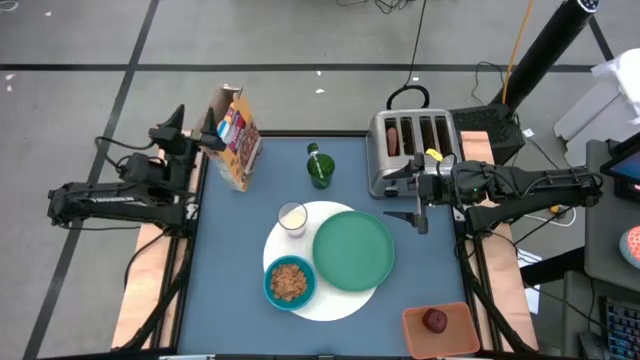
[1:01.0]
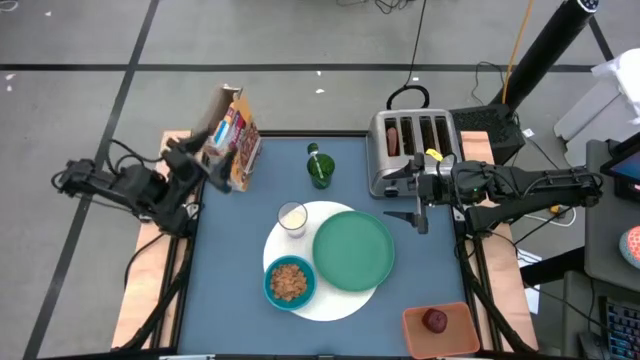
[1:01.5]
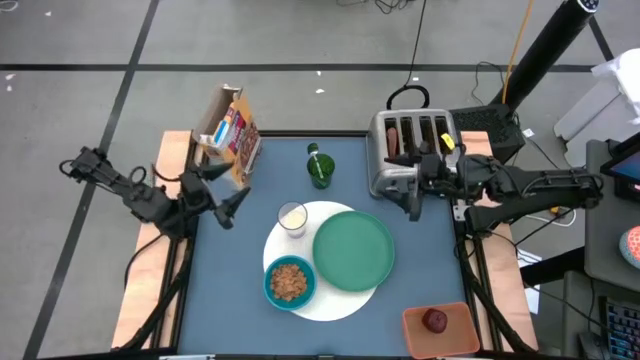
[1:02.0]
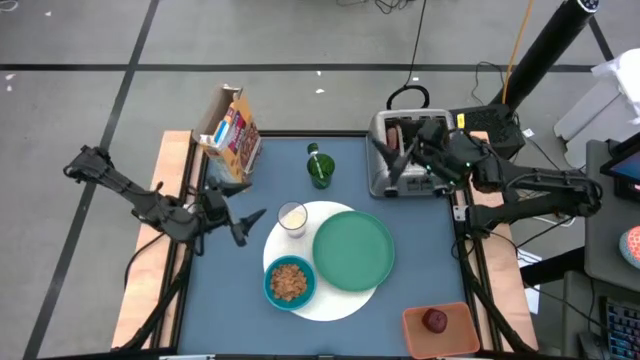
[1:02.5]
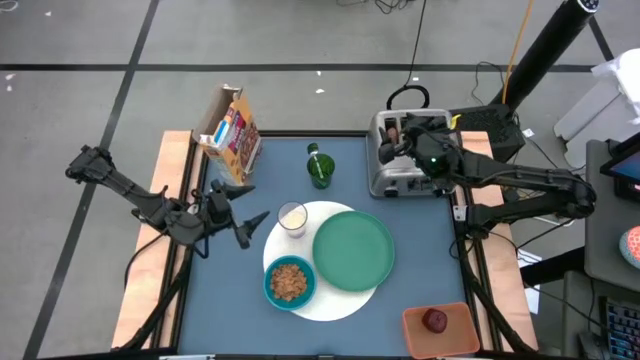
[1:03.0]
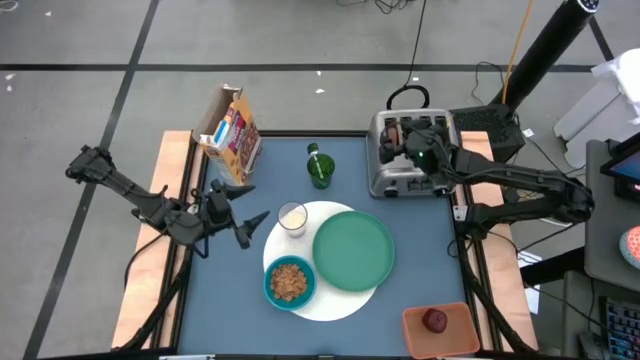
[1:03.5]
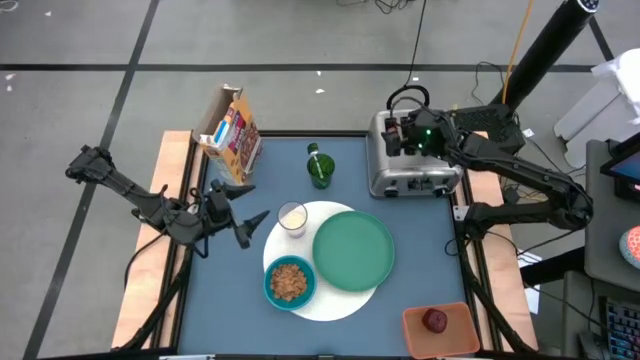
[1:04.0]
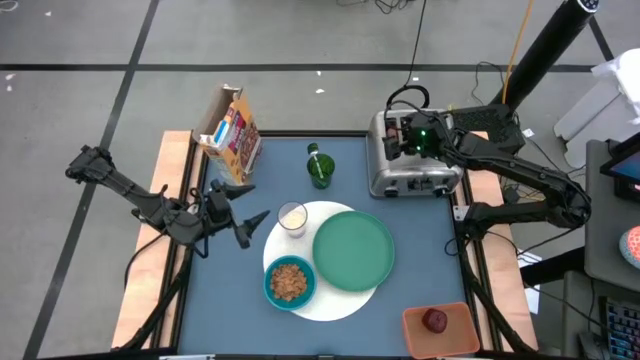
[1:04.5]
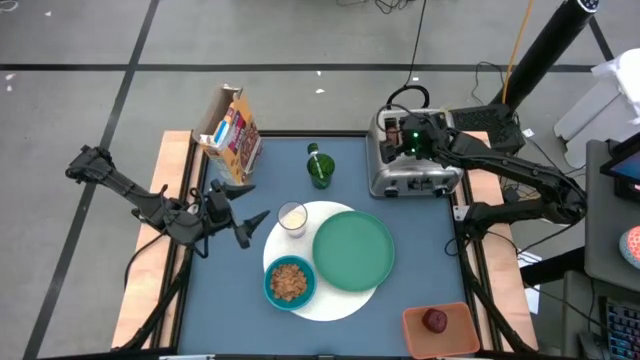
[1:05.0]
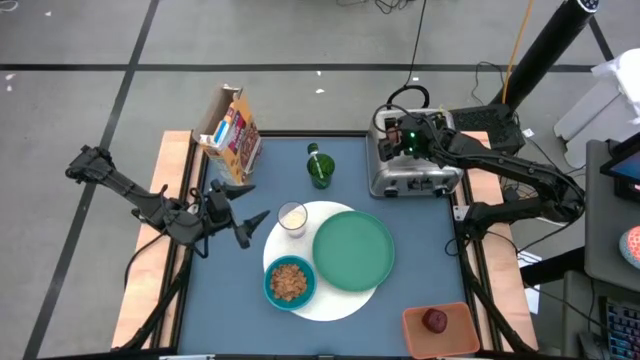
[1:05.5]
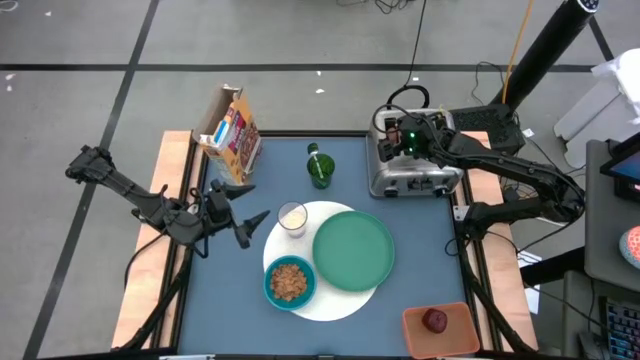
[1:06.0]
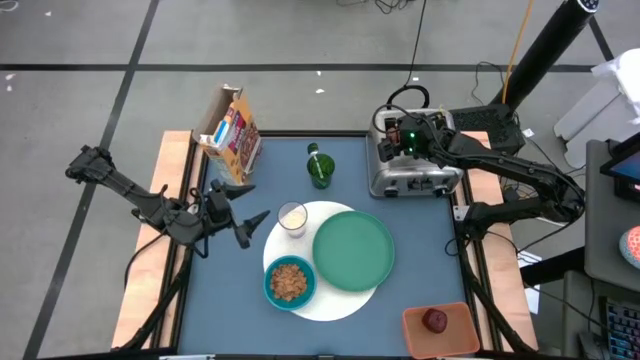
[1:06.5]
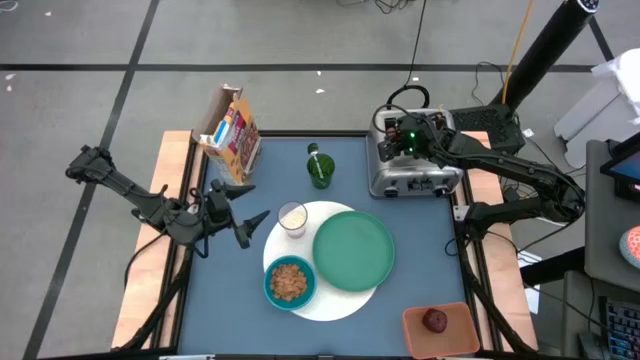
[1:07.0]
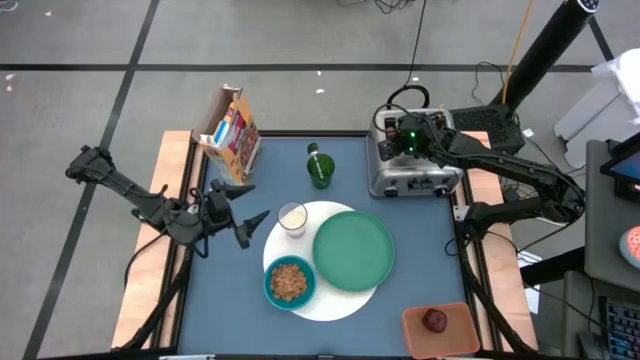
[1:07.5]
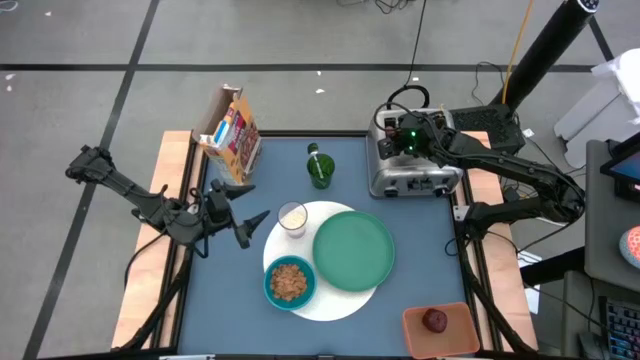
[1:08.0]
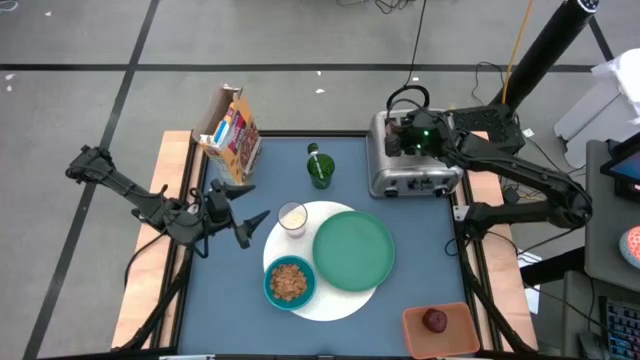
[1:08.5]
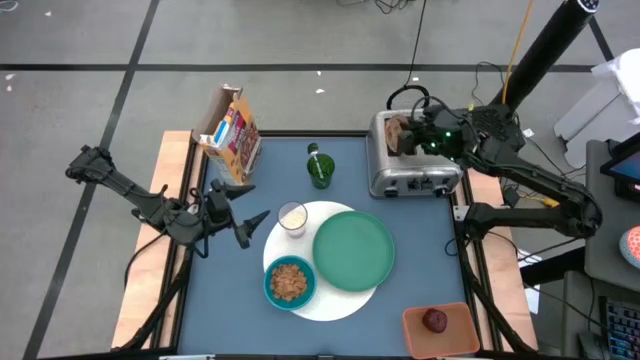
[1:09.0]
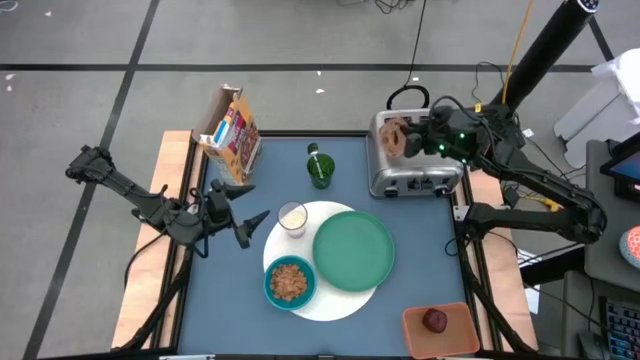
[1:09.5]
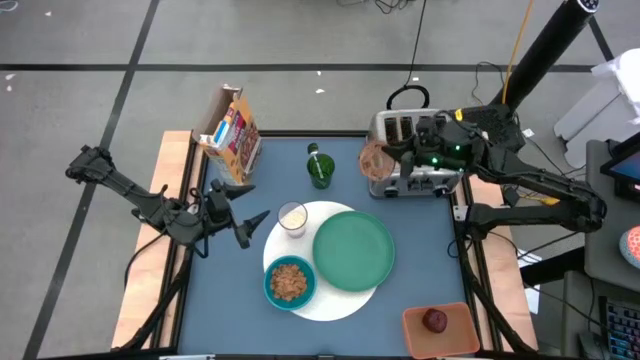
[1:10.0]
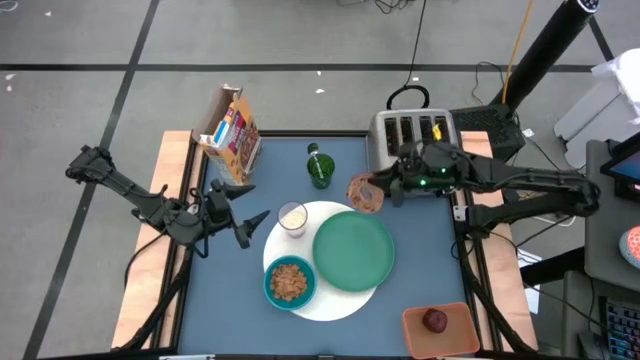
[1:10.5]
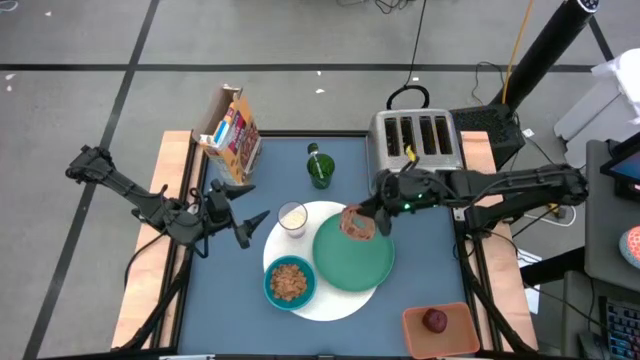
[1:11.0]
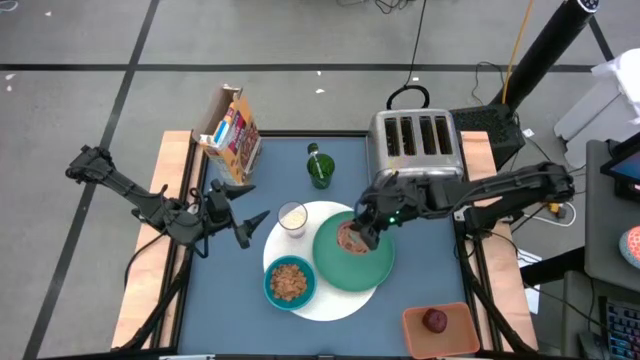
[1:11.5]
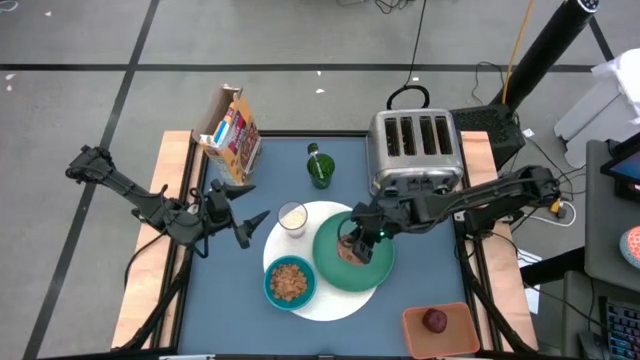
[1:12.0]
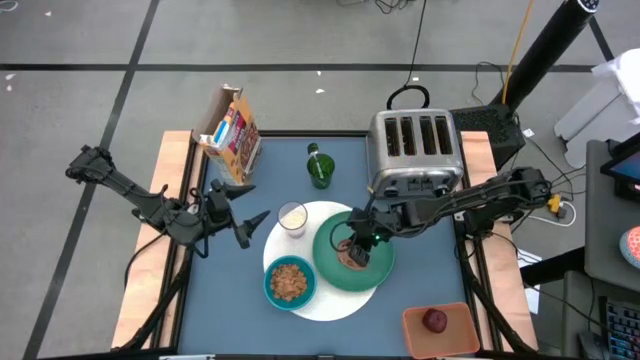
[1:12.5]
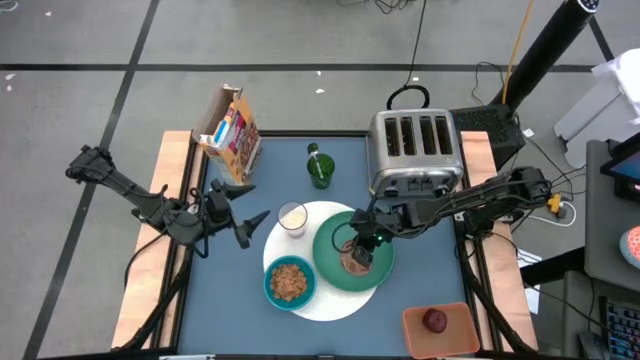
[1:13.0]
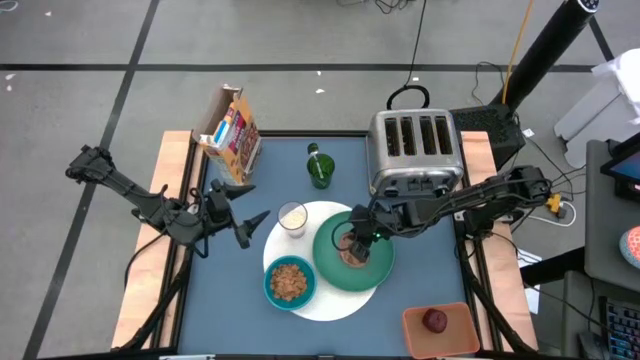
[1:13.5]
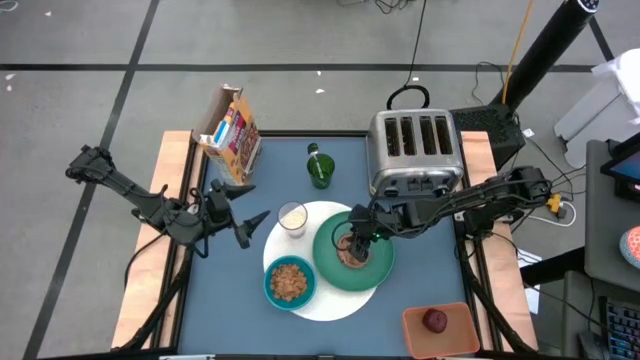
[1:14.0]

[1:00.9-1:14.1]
Task: Arrange a breakfast setting
Put the toasted bread on the green plate
